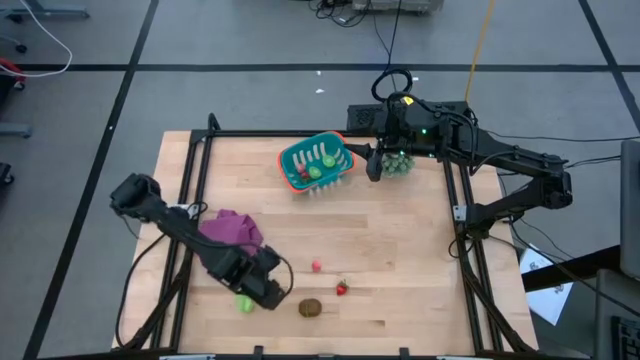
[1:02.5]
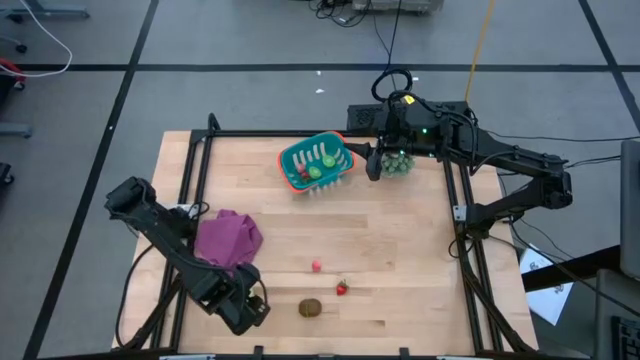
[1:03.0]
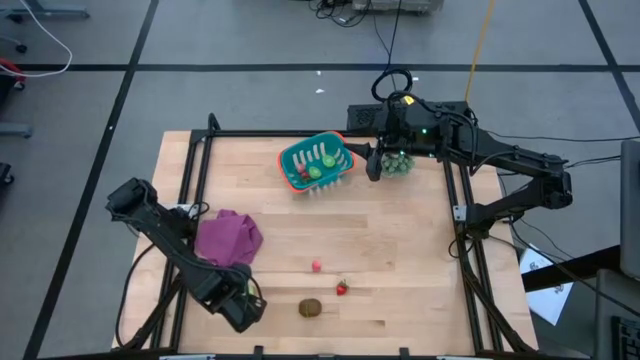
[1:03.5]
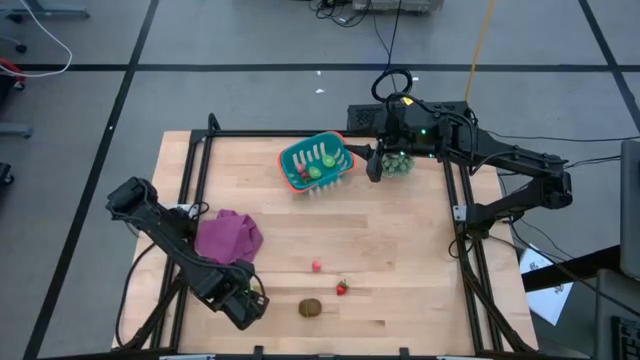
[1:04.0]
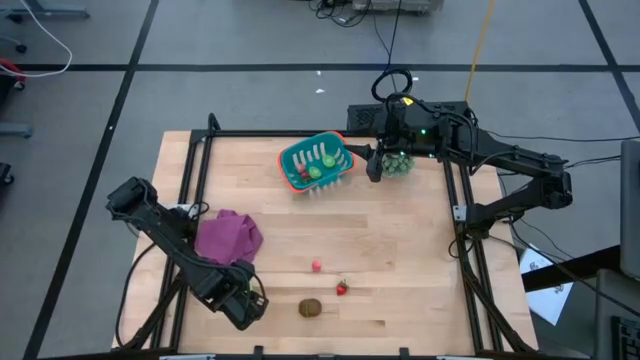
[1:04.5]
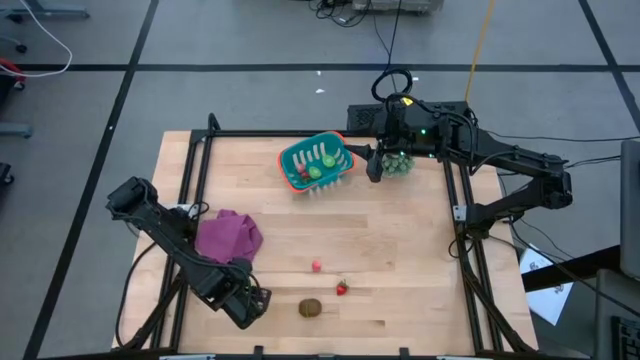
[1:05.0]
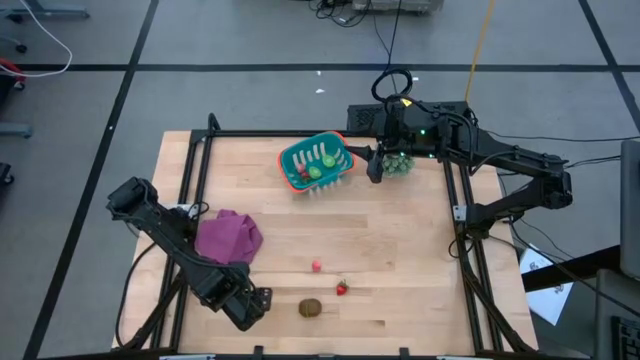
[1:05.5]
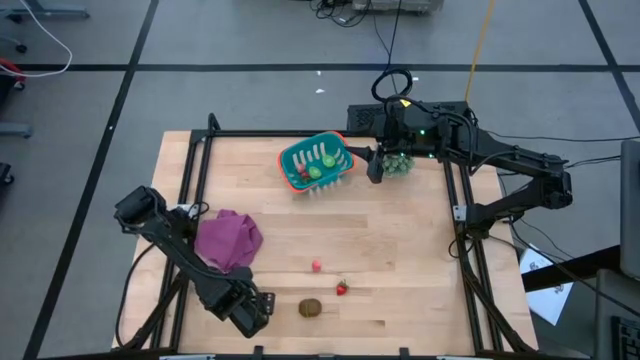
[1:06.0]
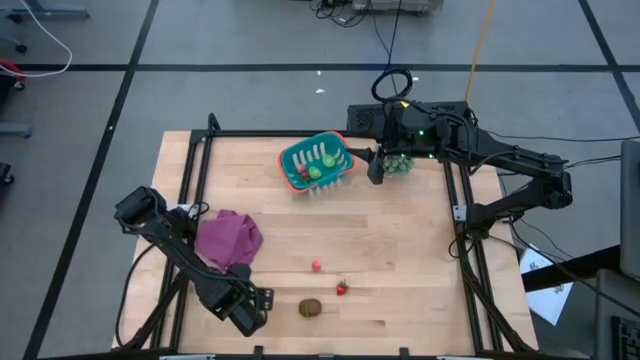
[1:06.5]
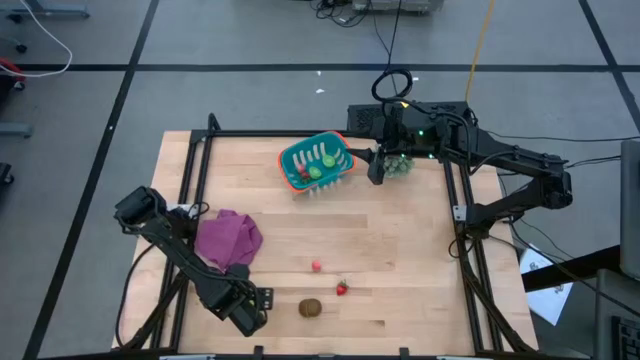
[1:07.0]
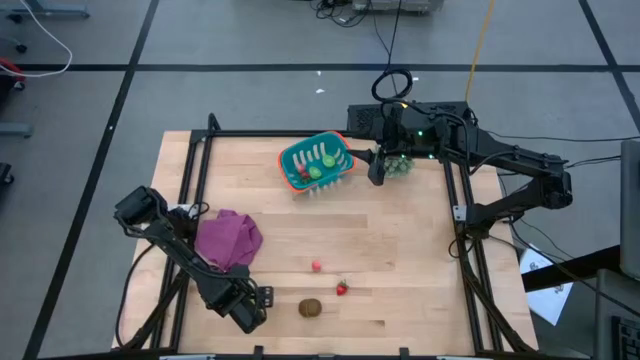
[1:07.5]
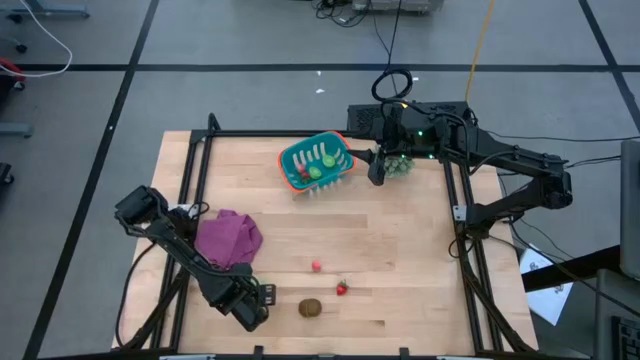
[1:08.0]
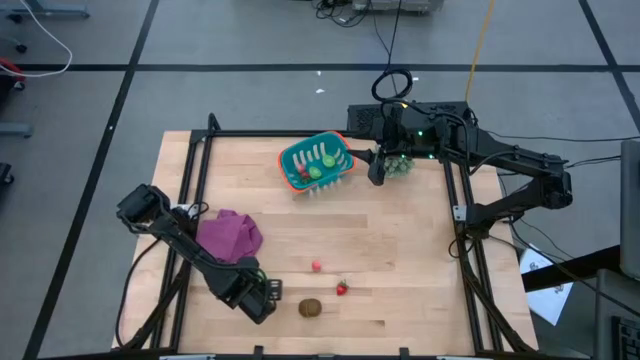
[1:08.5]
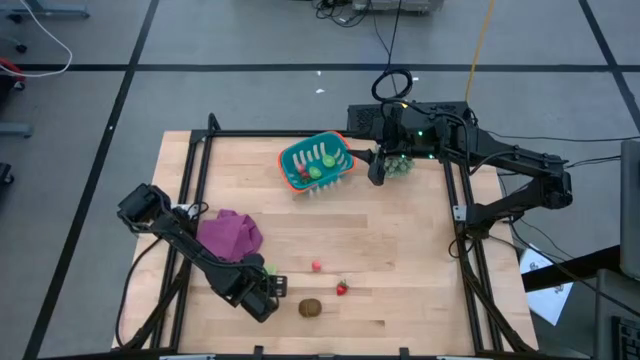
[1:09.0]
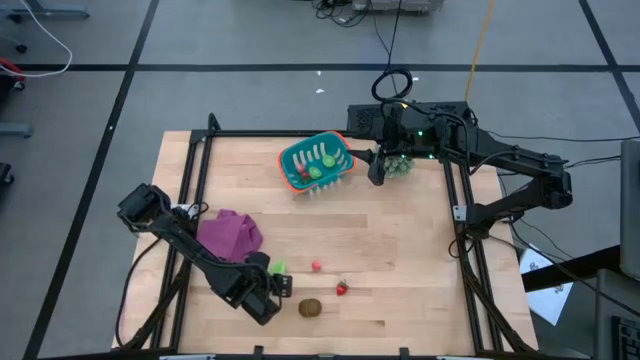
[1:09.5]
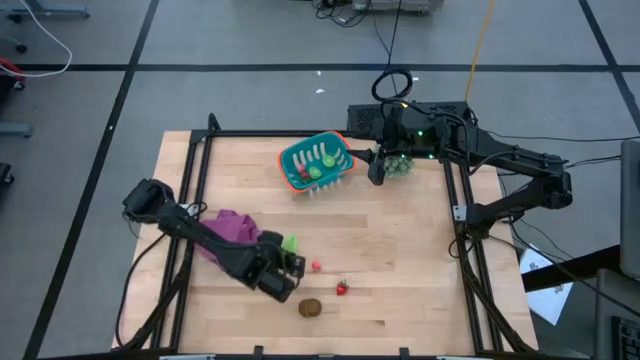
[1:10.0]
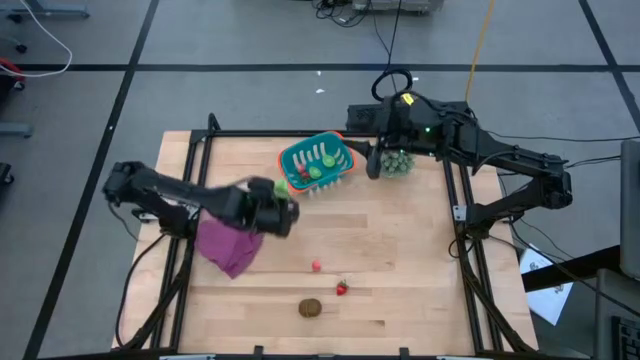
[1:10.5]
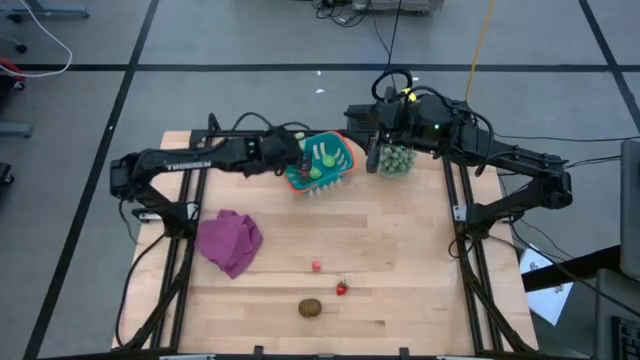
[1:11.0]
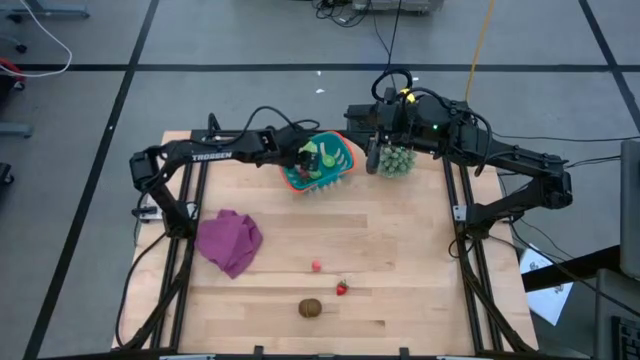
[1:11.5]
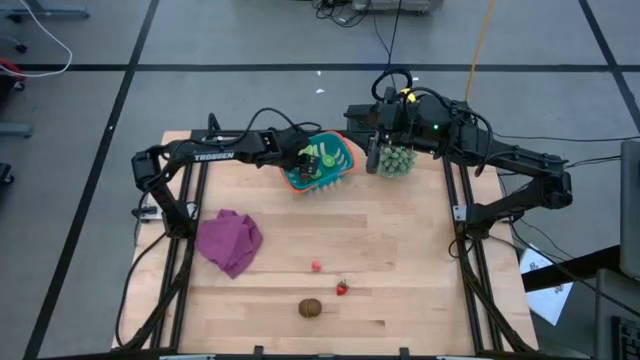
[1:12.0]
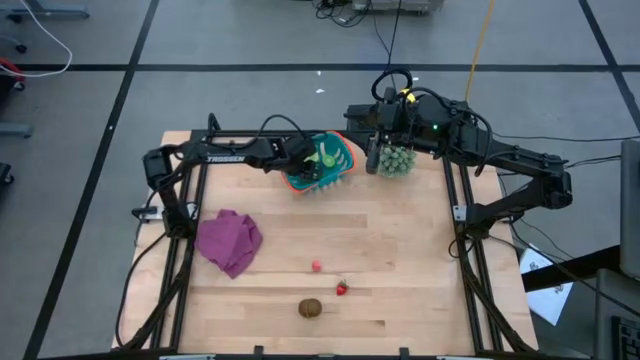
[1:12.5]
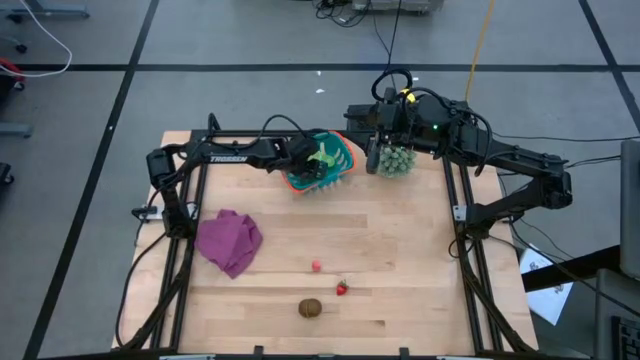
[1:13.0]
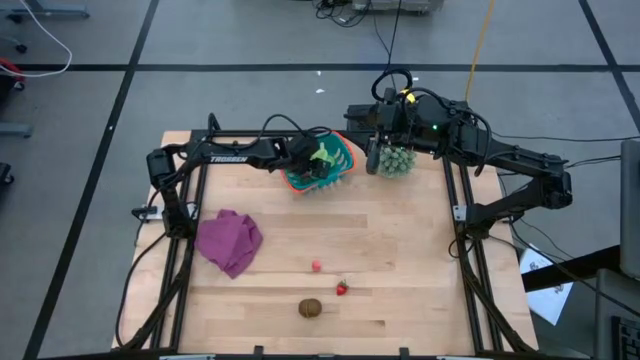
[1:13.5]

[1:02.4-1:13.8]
Task: Pick and placing Produce into tupperware
Put the star fruit into the blue basket

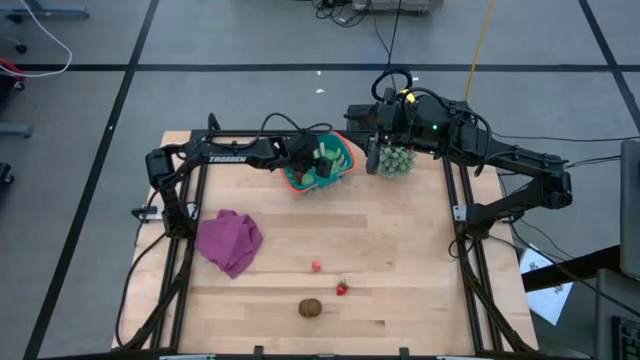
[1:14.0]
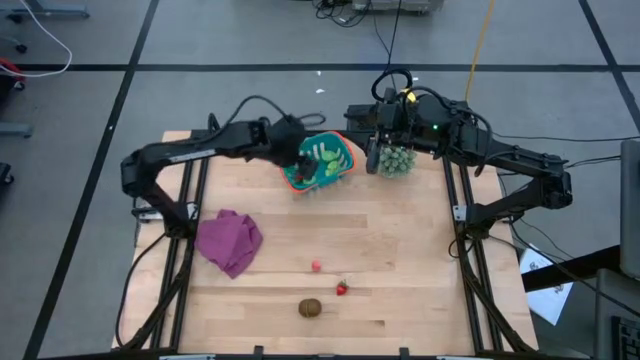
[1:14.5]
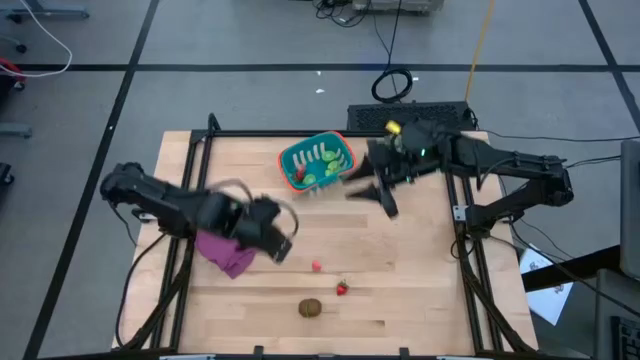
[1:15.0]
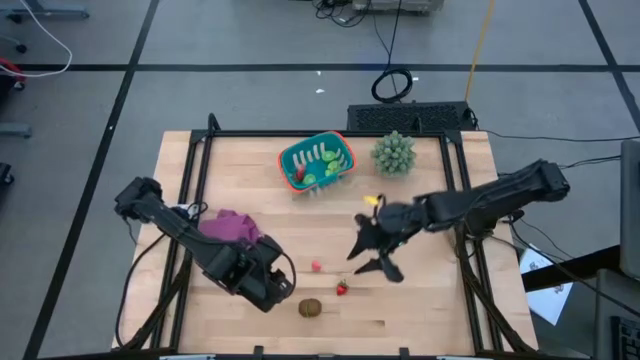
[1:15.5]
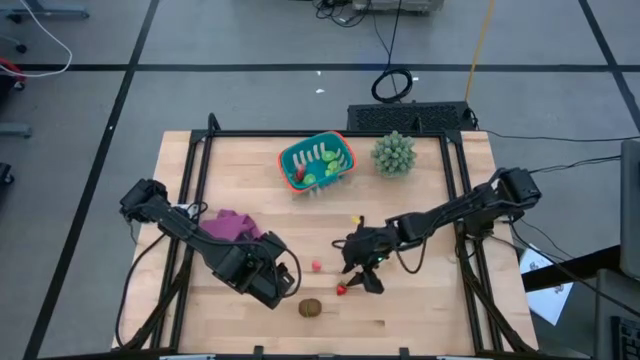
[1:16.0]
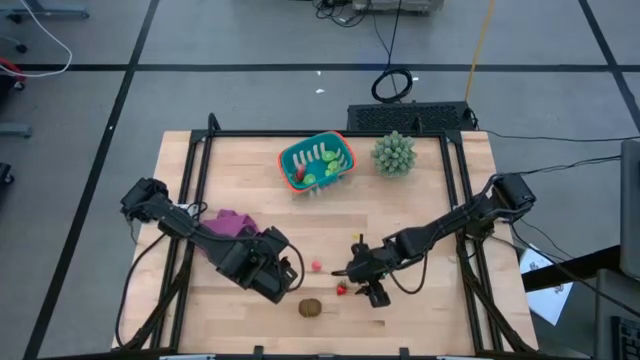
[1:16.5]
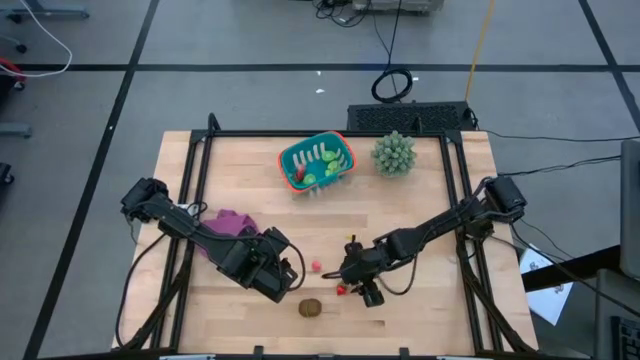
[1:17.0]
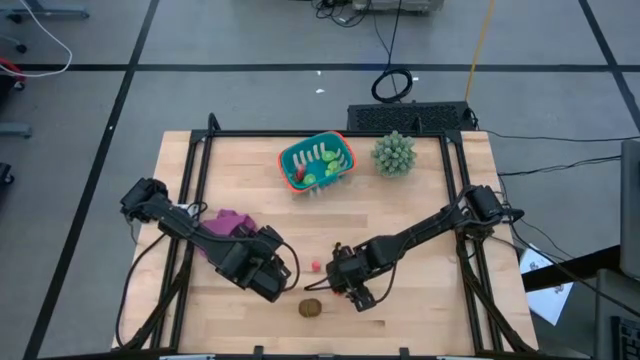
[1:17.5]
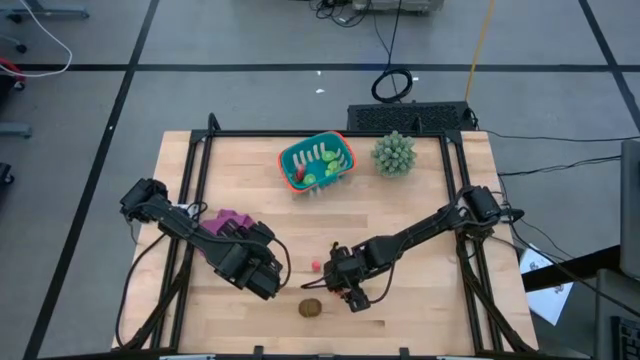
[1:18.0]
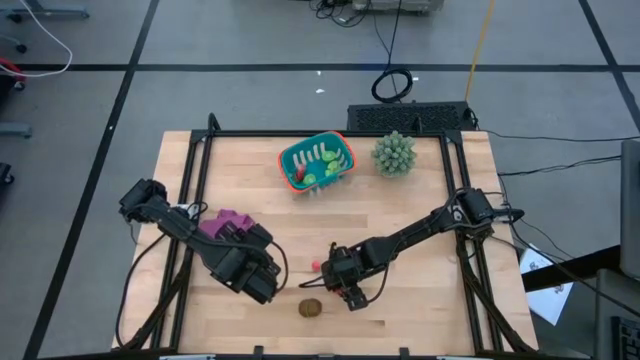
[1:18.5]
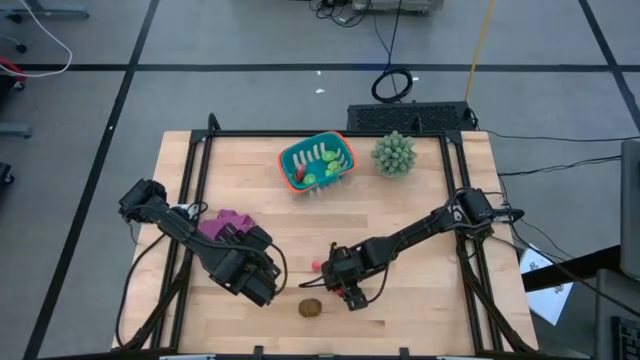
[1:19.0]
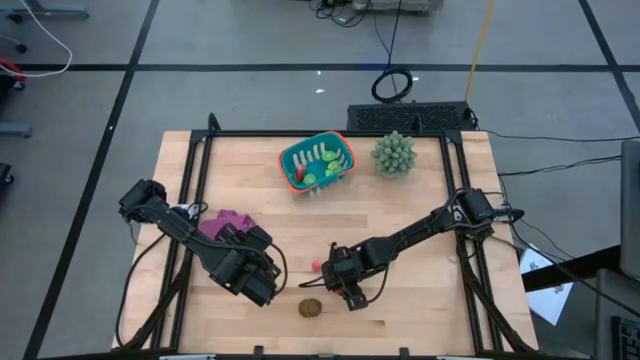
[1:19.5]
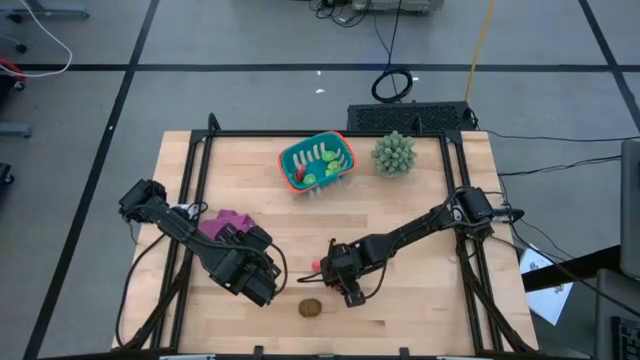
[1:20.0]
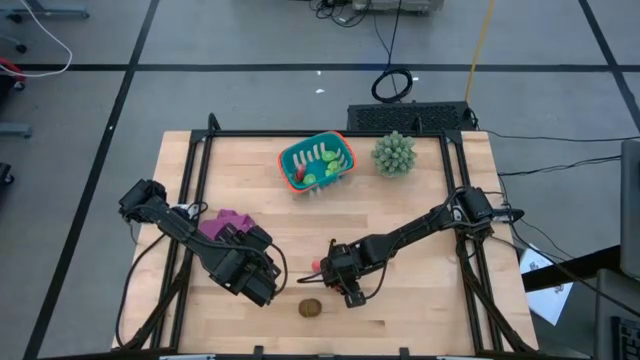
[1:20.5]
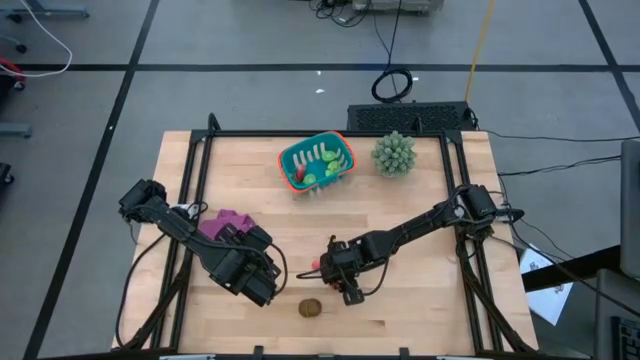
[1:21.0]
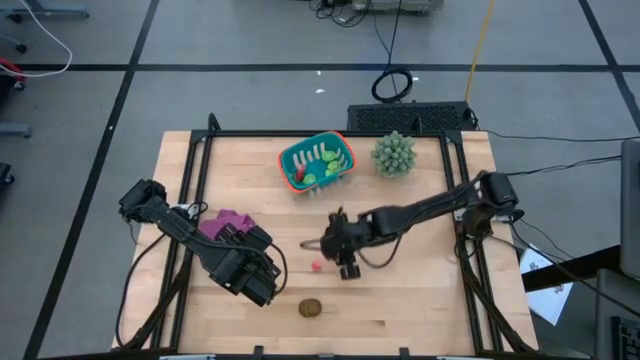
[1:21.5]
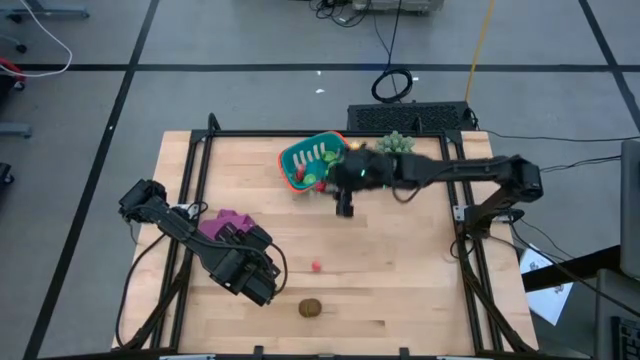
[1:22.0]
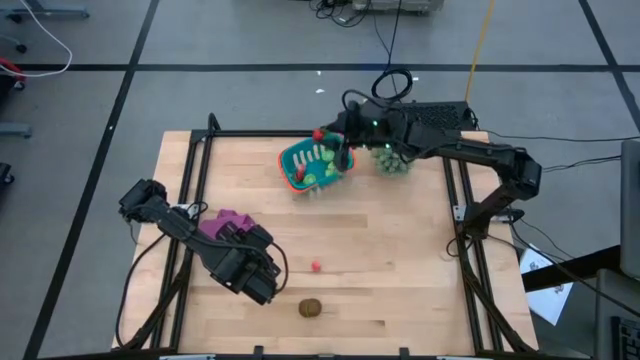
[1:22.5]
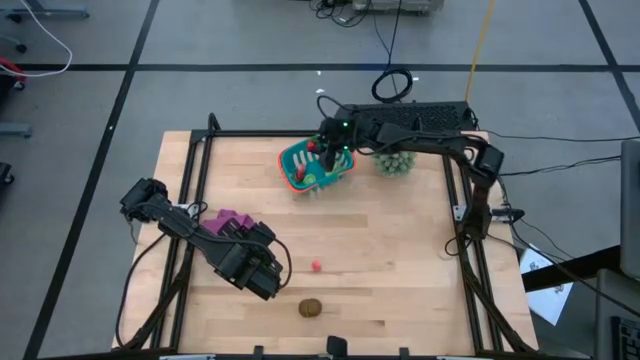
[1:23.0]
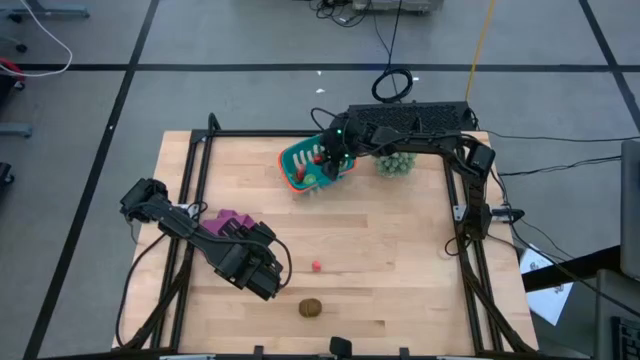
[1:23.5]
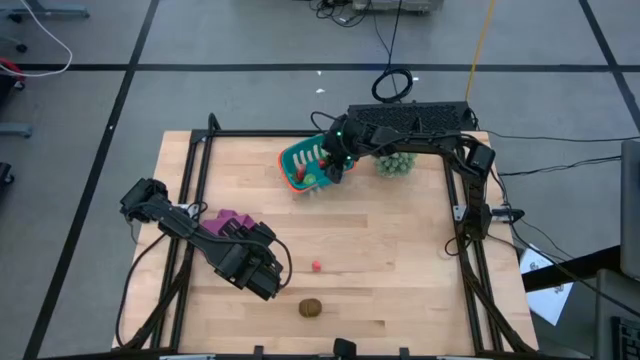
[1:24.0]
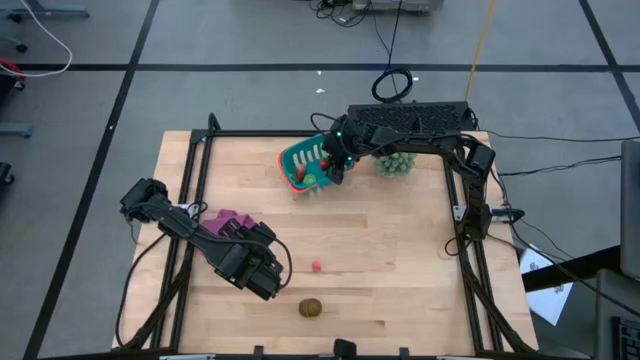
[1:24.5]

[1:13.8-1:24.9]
Put the strawberry into the blue basket
